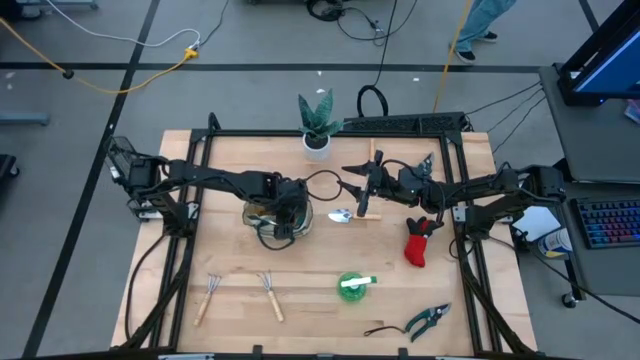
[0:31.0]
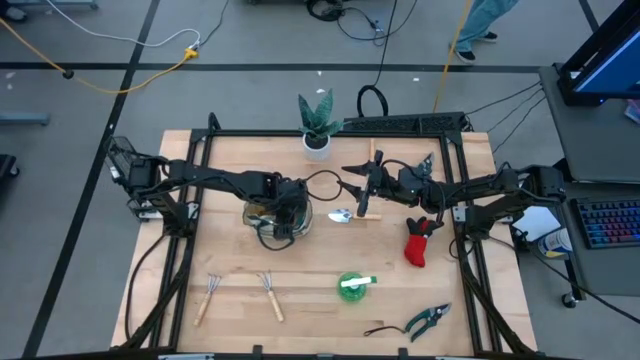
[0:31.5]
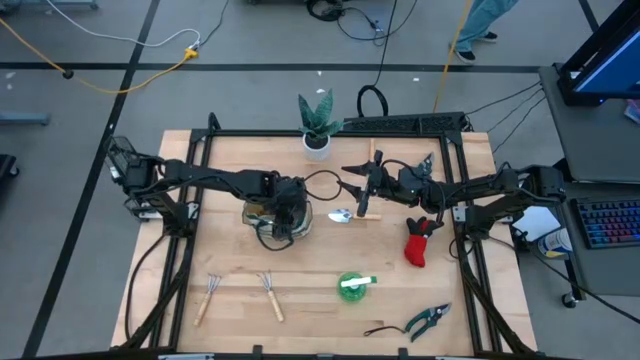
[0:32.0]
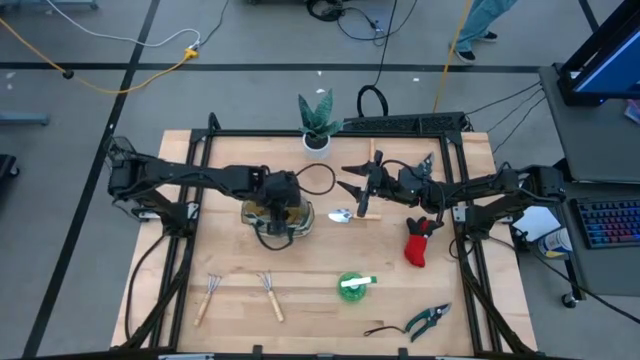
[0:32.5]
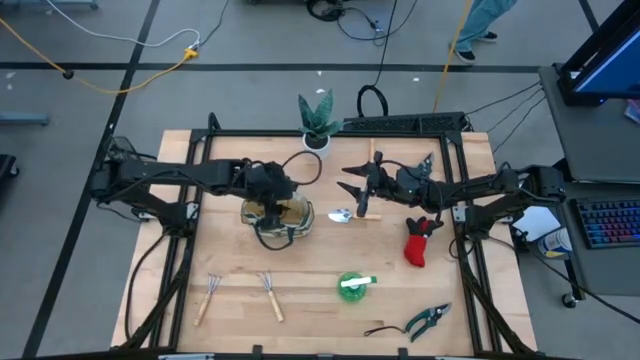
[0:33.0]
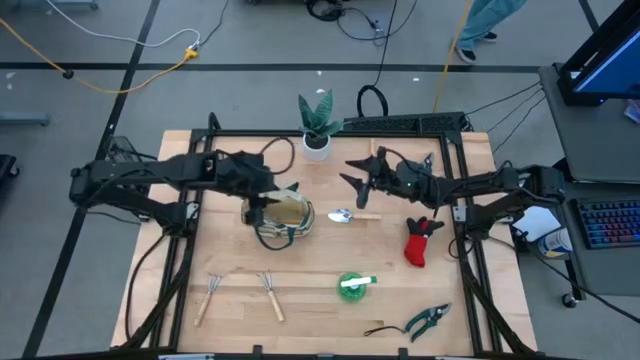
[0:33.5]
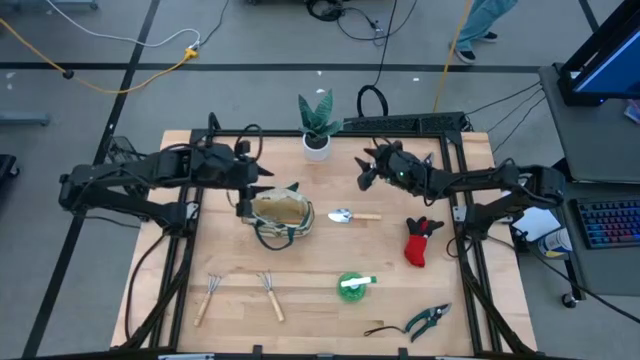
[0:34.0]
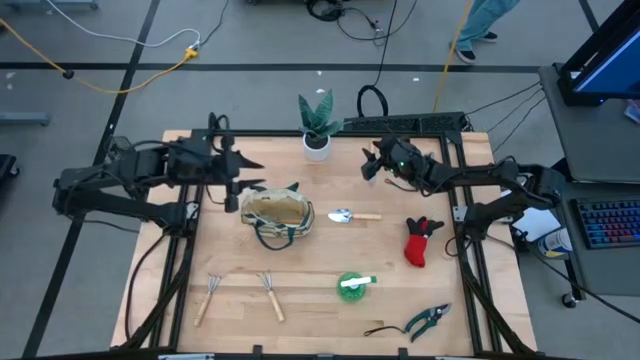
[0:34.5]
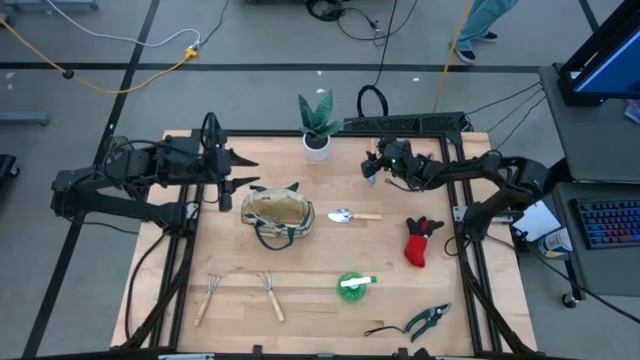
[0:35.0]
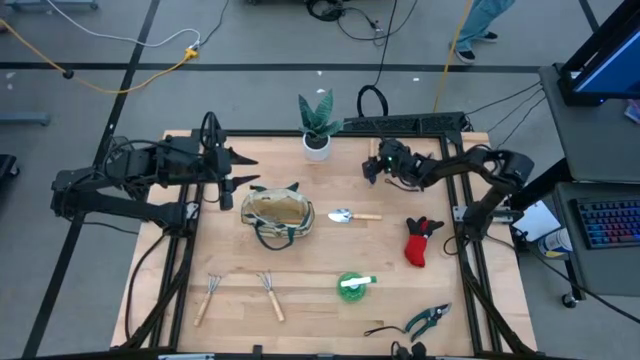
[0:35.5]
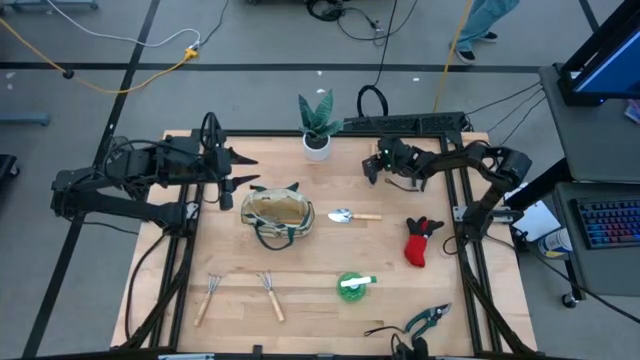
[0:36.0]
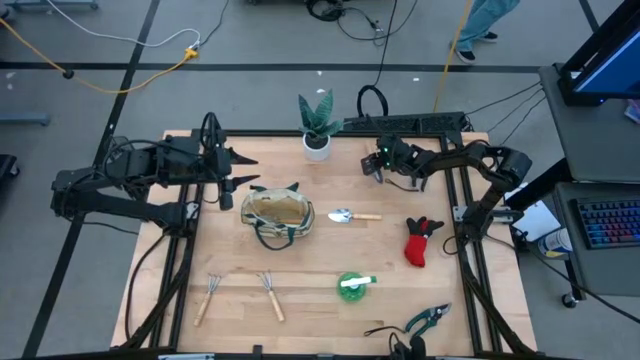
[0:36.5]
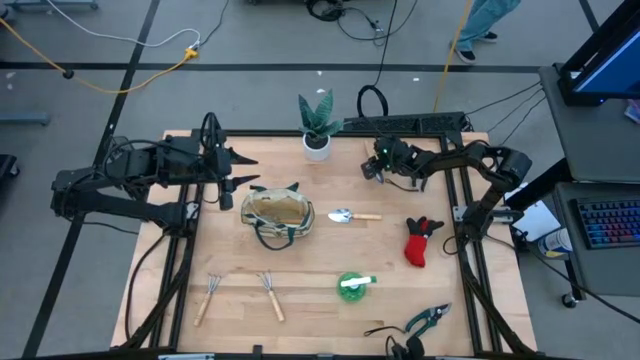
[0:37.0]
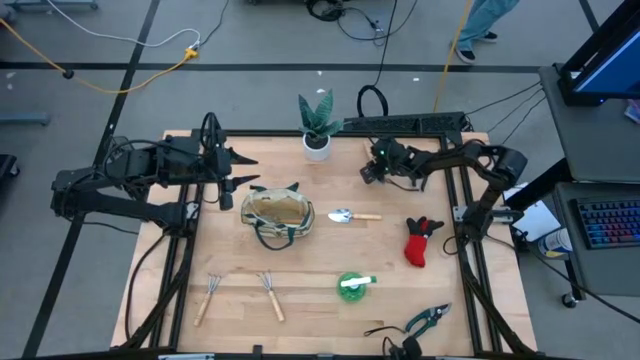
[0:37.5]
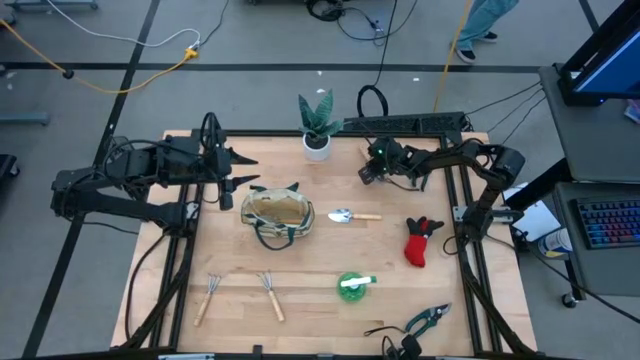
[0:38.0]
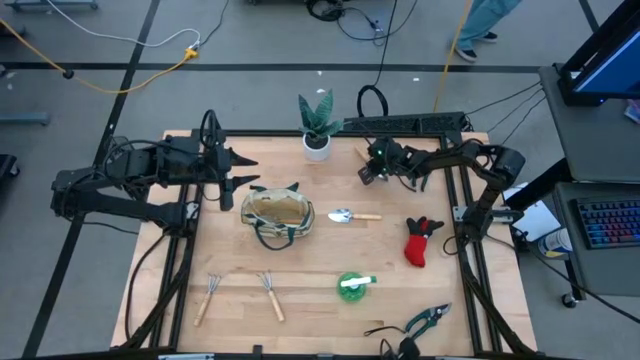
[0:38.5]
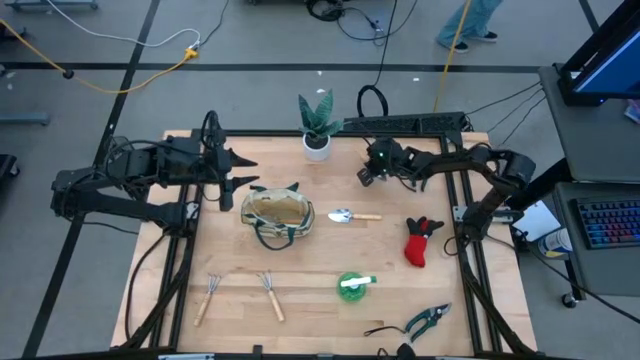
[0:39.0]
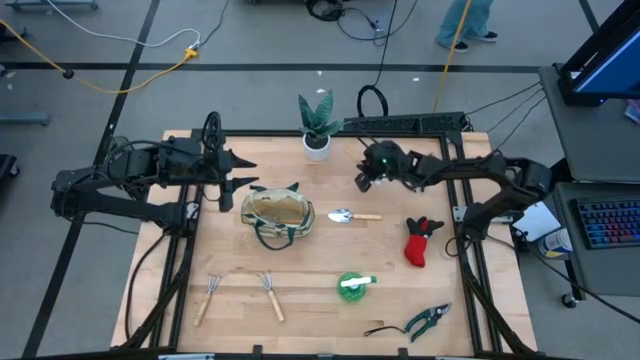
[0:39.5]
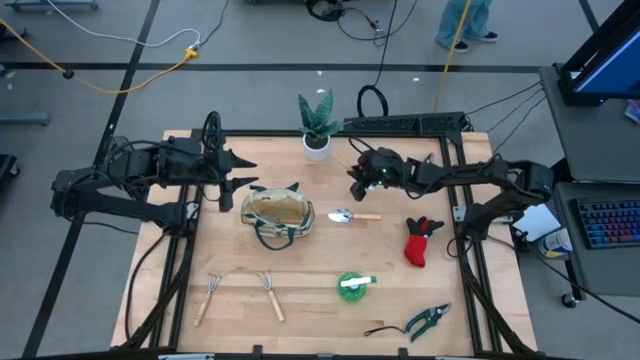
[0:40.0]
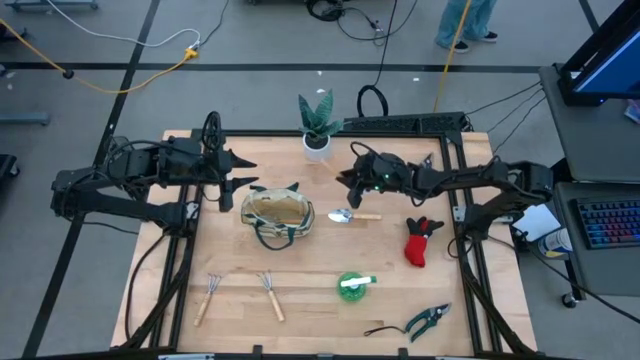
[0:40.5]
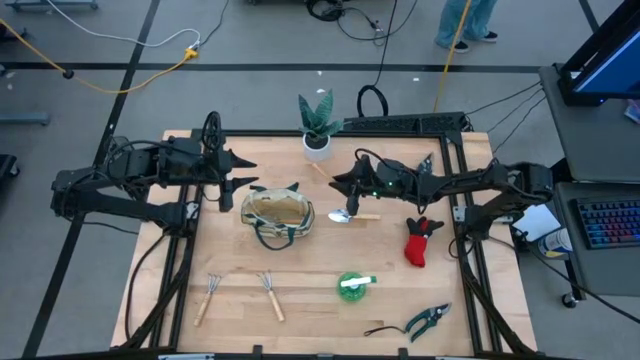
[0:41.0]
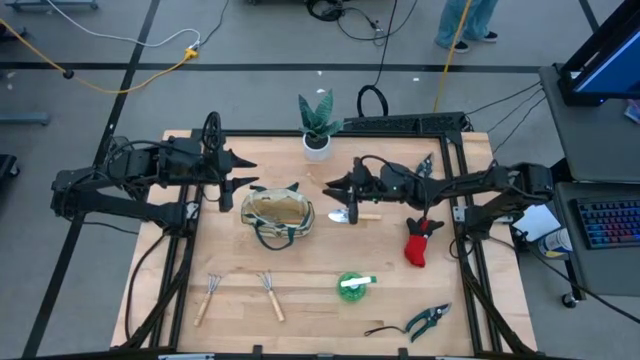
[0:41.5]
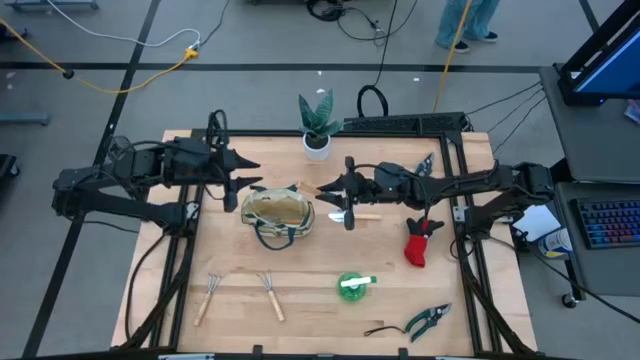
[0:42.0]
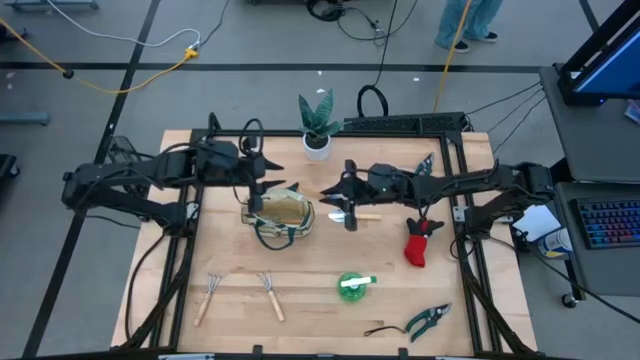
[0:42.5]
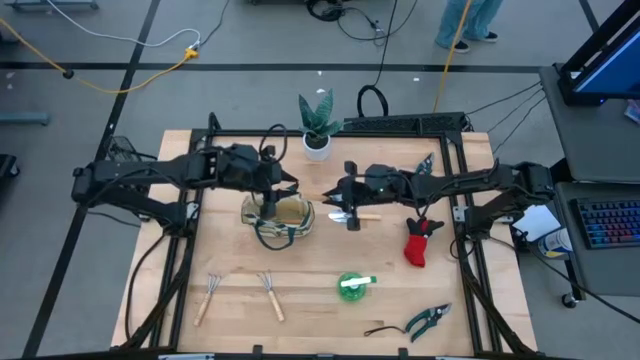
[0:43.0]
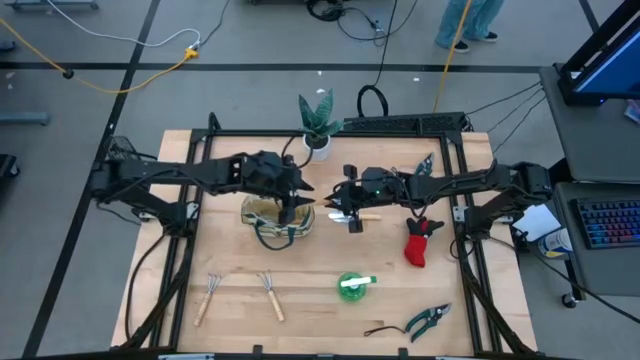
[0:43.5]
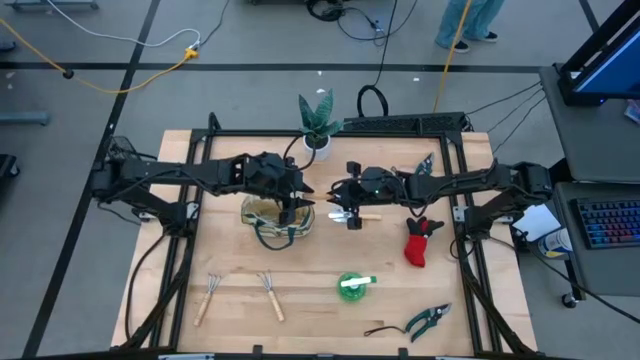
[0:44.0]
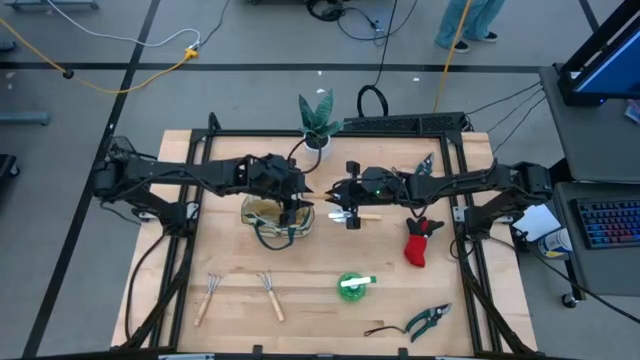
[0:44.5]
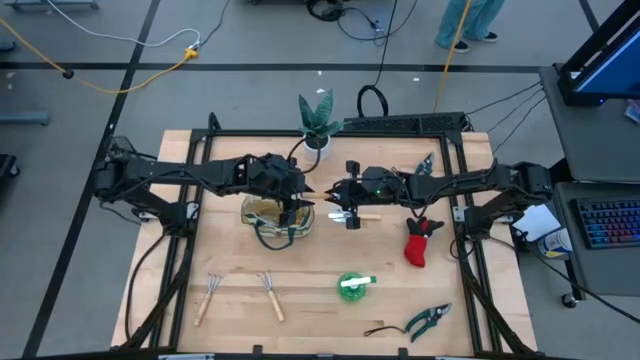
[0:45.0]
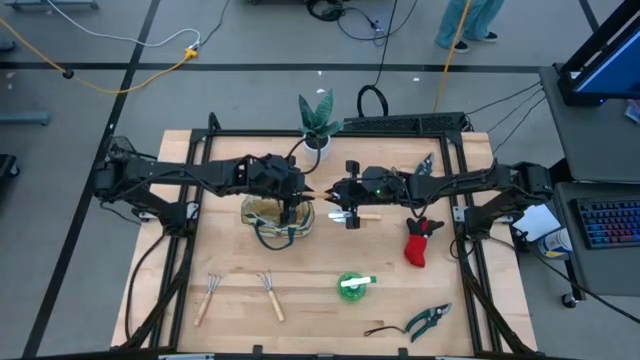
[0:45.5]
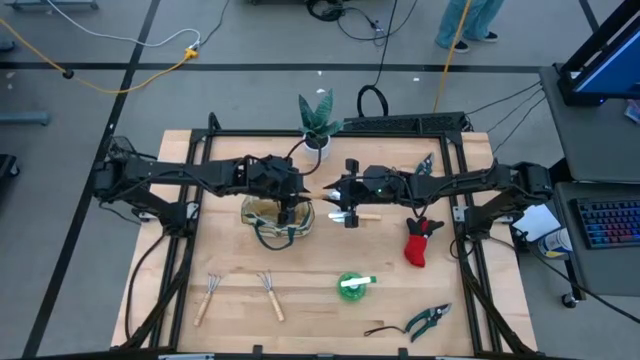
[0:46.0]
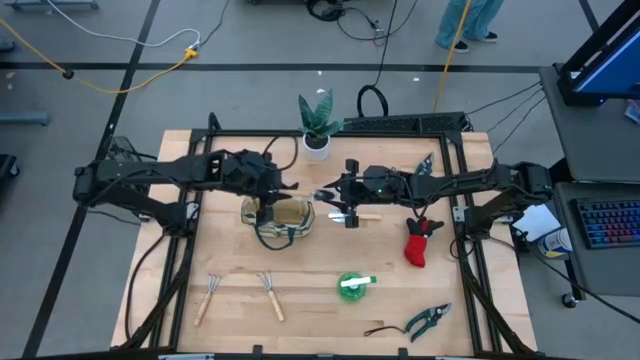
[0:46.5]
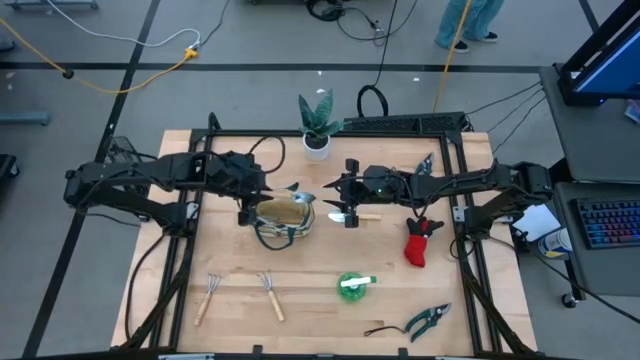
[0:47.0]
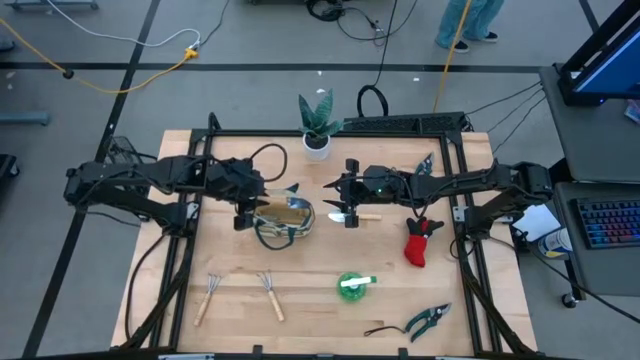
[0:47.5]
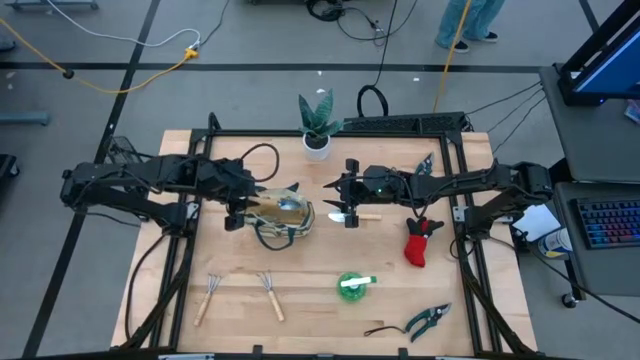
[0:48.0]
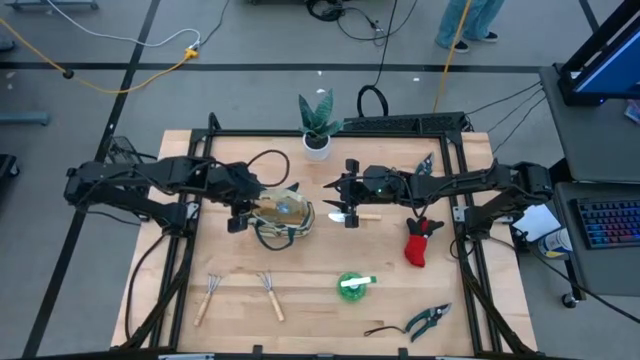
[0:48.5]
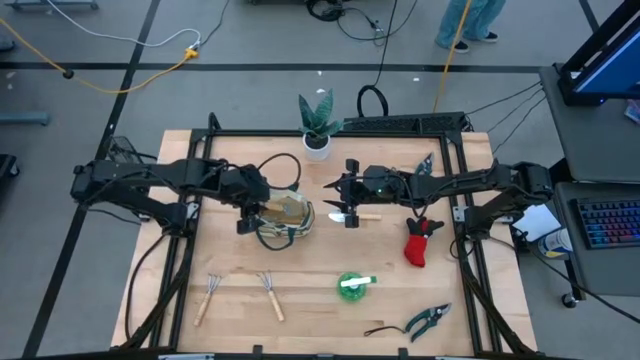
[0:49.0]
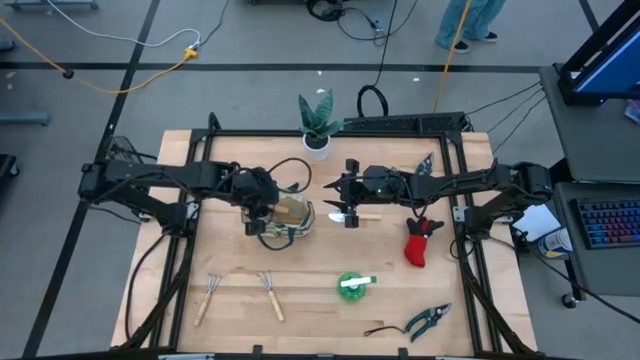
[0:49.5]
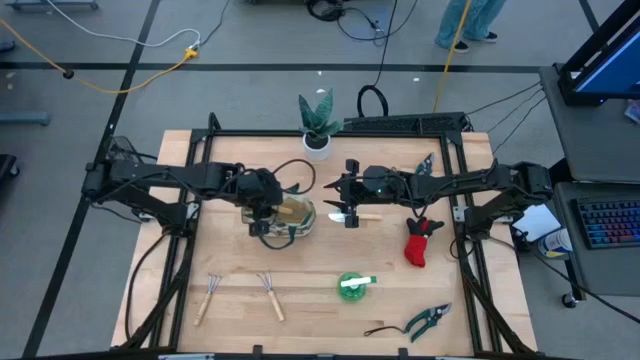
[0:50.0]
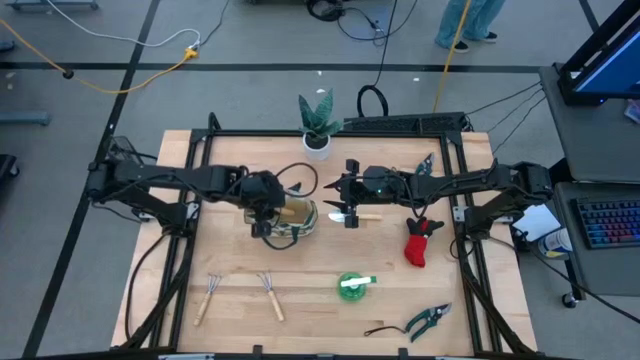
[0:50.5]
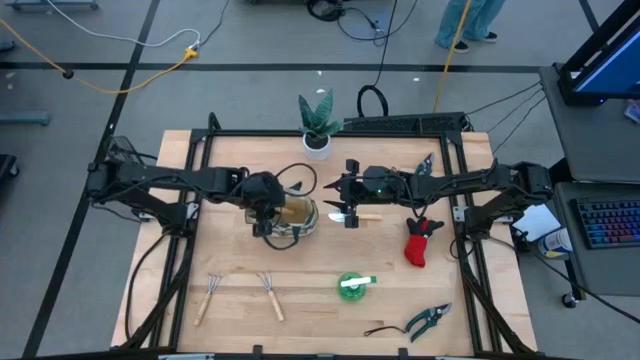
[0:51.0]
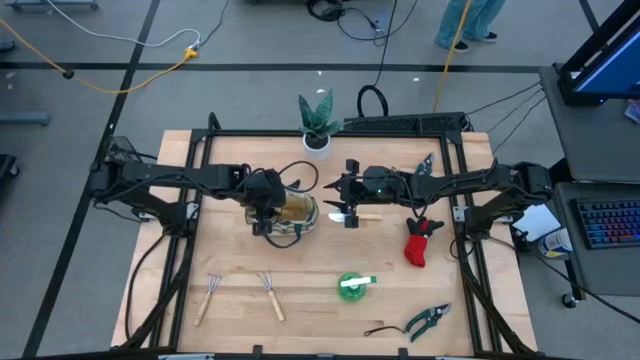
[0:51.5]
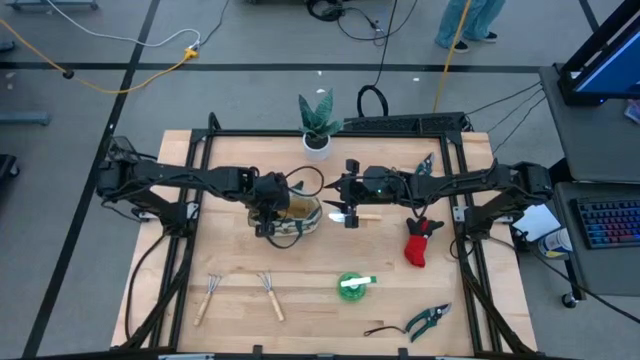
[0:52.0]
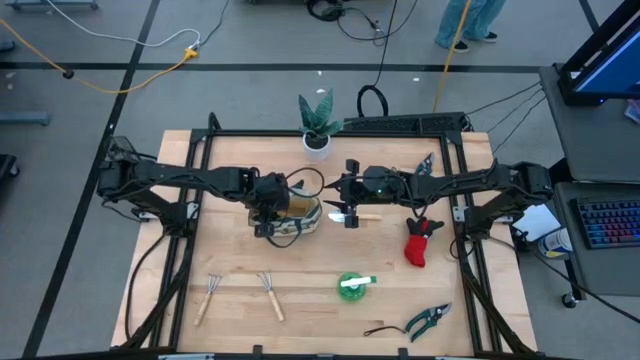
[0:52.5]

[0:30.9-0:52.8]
Task: Pick & Place Garden tools in Gardening bag
Put the top brown trowel into the white gardening bag
